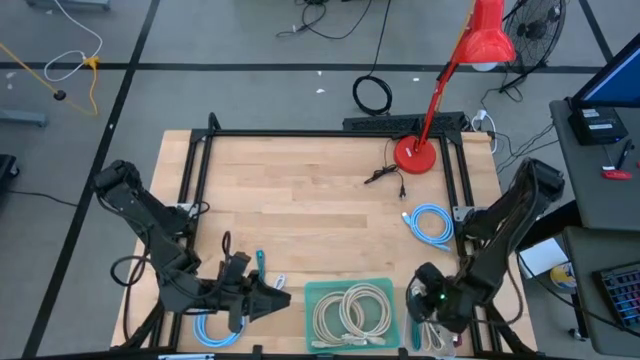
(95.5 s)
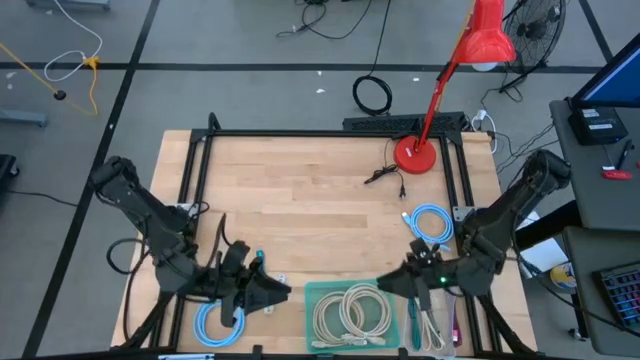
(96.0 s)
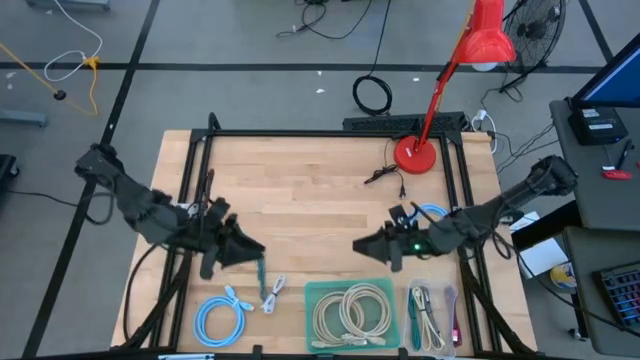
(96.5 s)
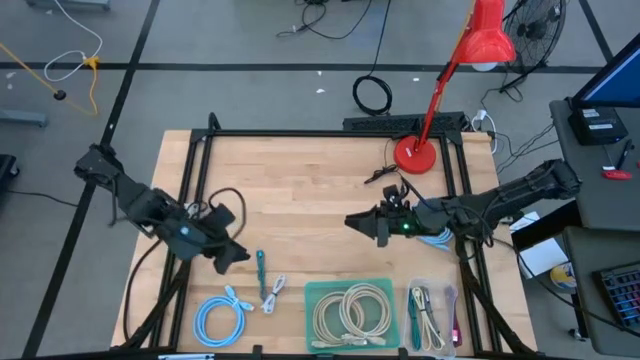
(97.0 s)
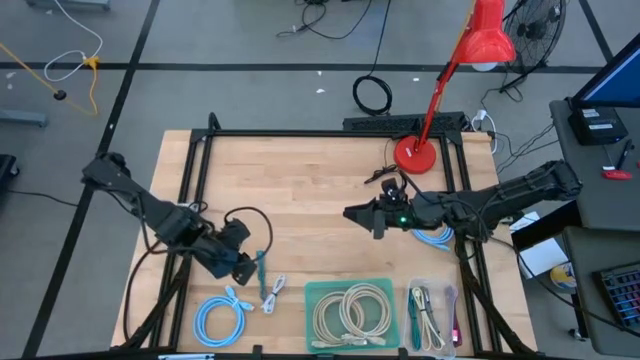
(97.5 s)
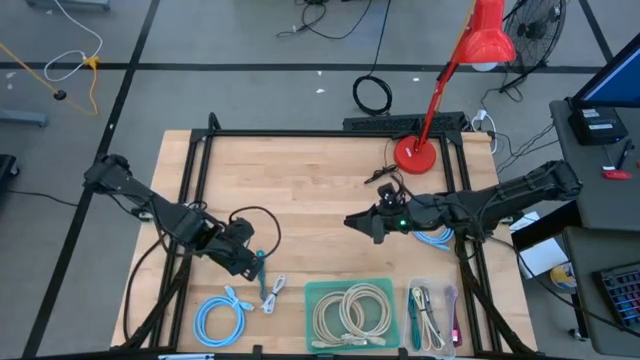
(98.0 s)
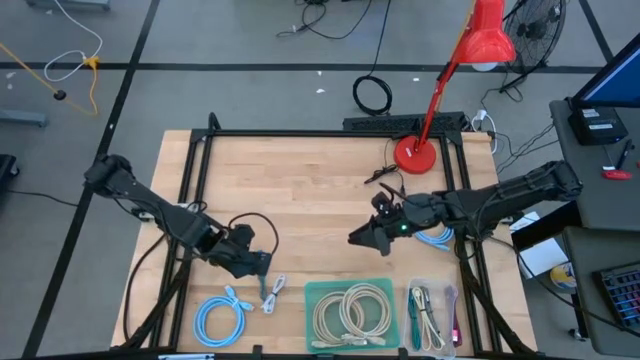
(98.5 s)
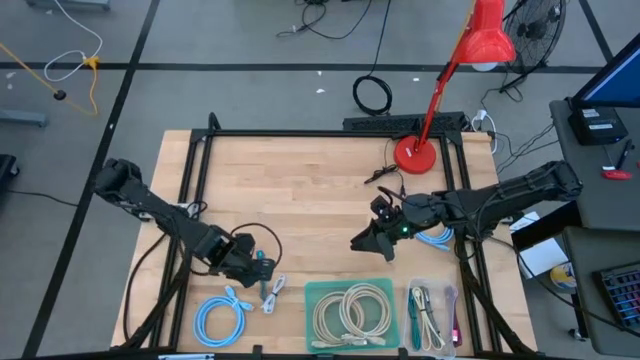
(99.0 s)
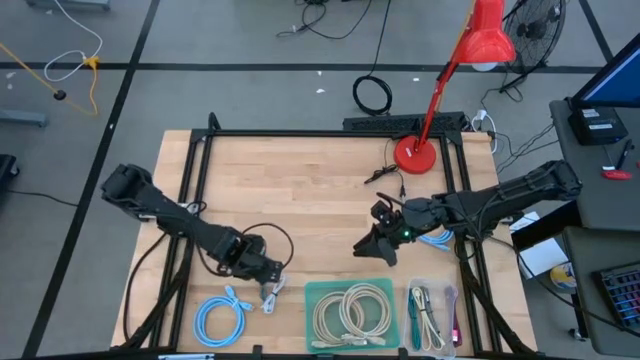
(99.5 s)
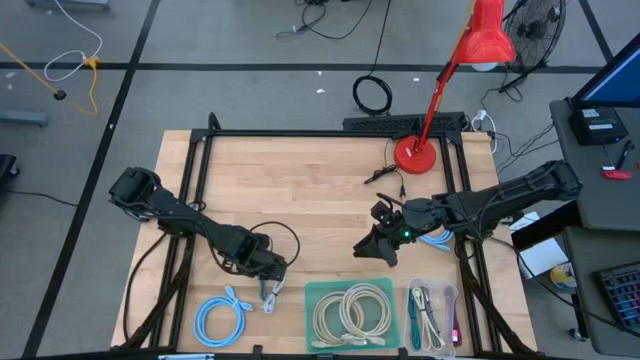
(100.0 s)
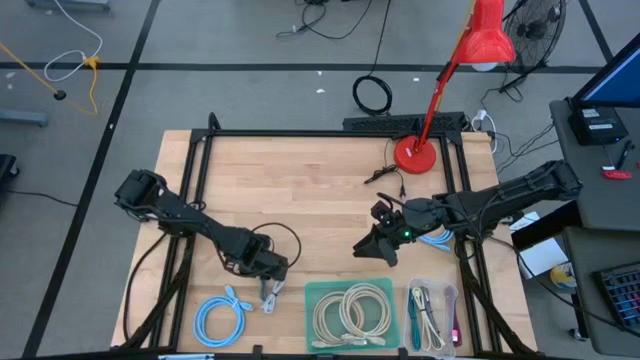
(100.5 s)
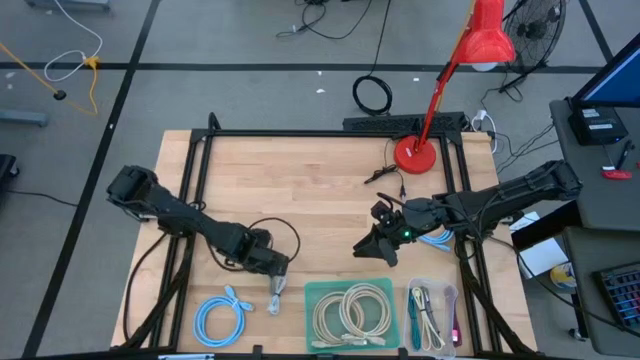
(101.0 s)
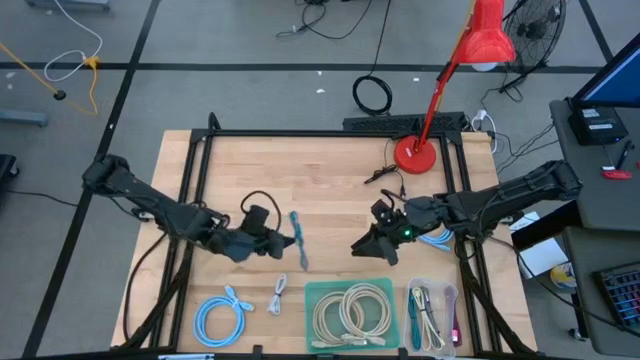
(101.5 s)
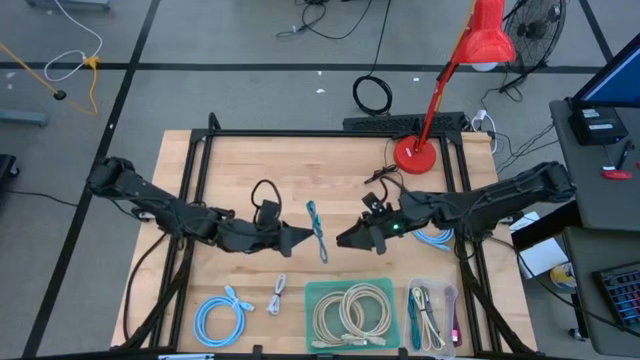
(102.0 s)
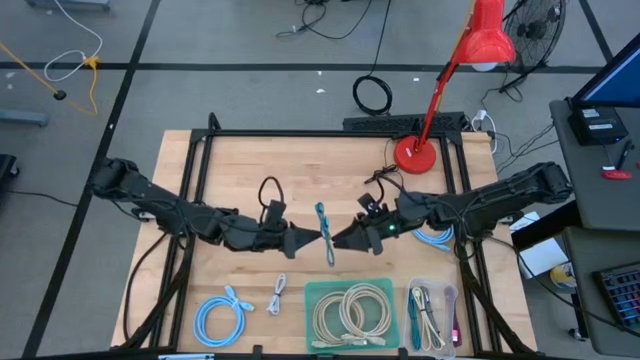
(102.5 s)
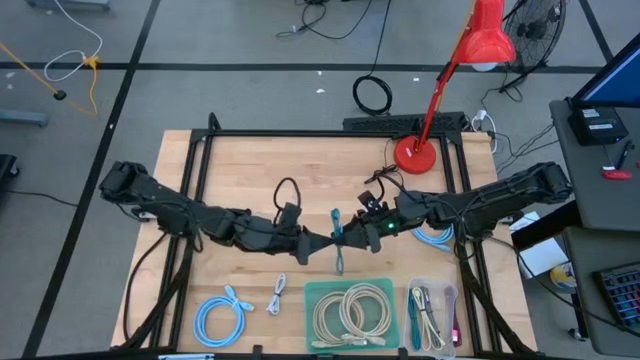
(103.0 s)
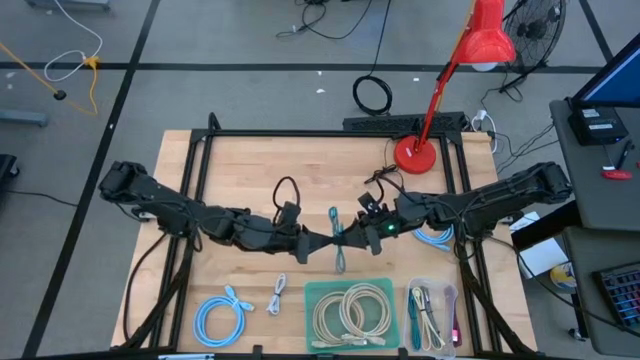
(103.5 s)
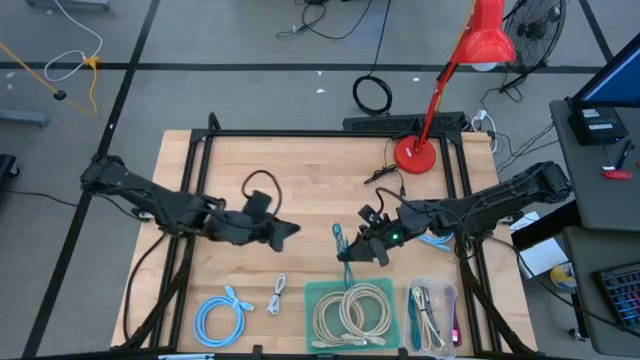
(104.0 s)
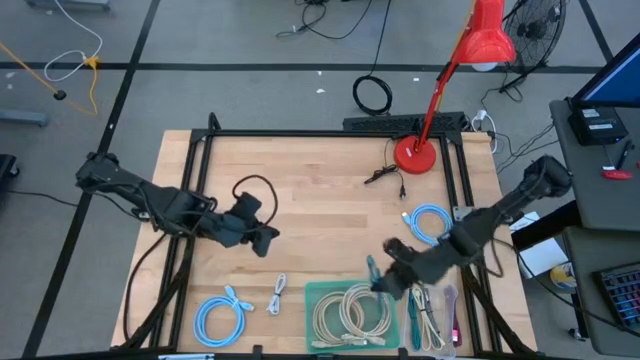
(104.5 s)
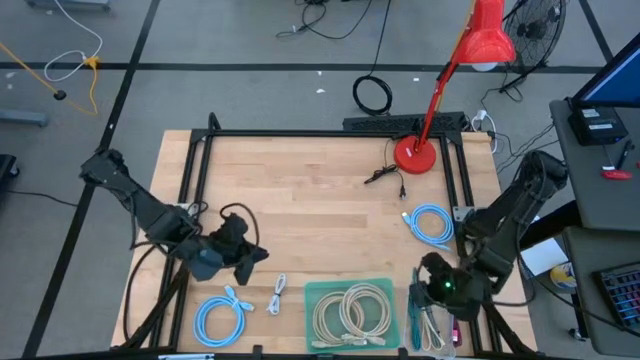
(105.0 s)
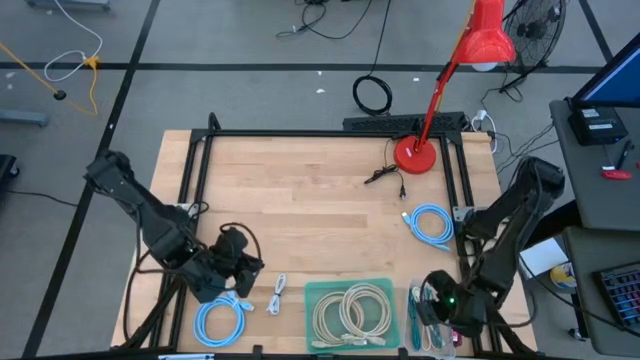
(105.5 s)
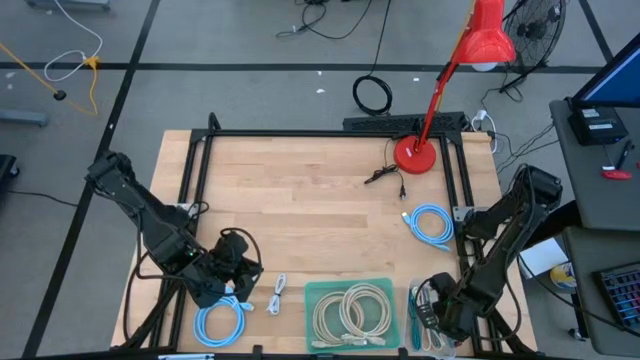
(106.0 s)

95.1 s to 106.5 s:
Task: Pick & Place USB Port
Put the blue charger cable into the white transparent bin

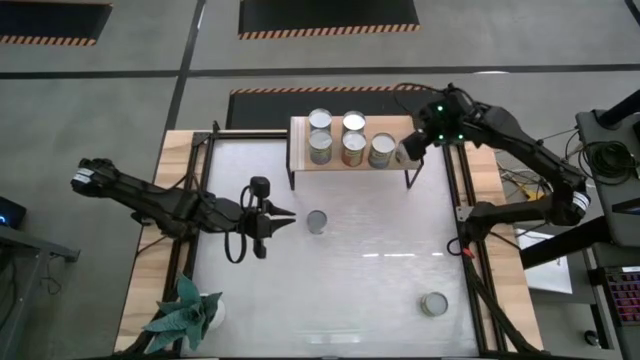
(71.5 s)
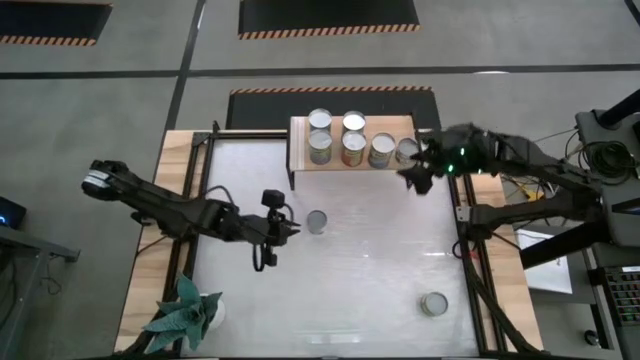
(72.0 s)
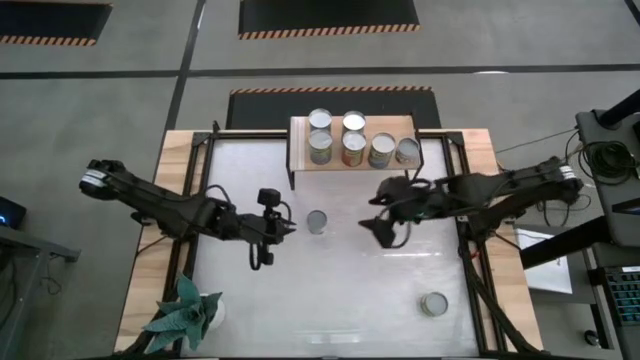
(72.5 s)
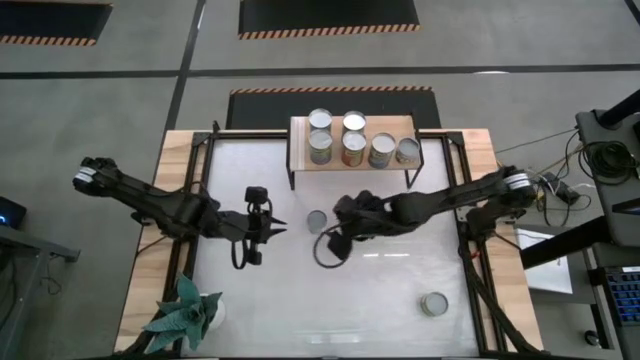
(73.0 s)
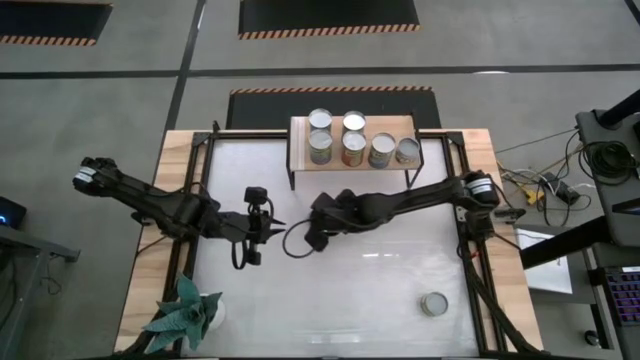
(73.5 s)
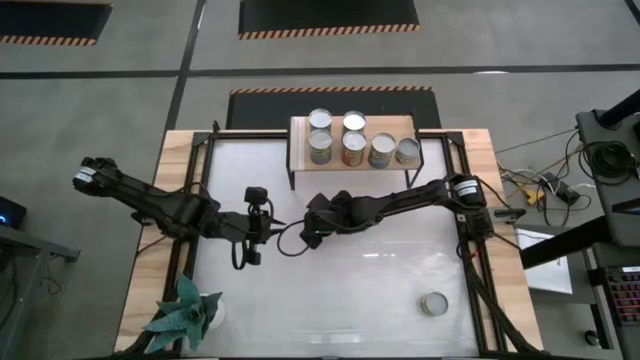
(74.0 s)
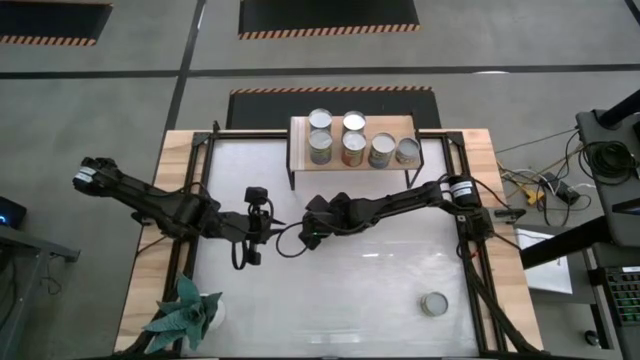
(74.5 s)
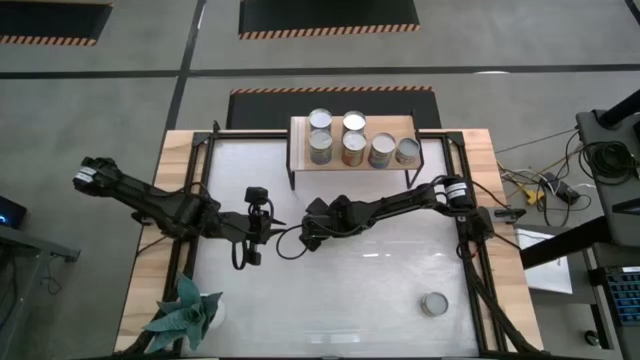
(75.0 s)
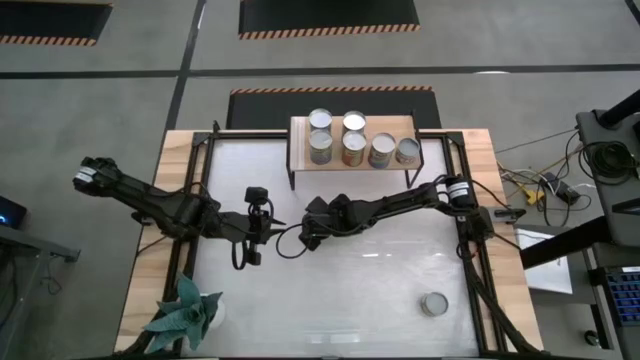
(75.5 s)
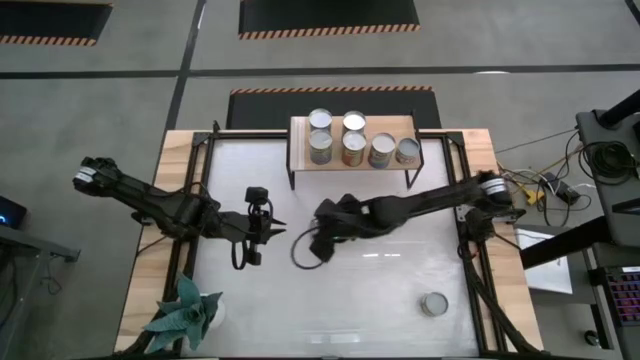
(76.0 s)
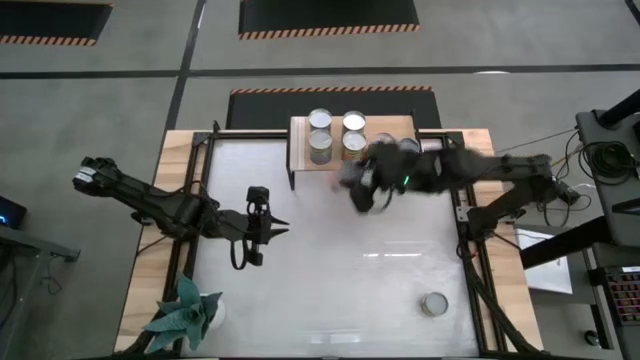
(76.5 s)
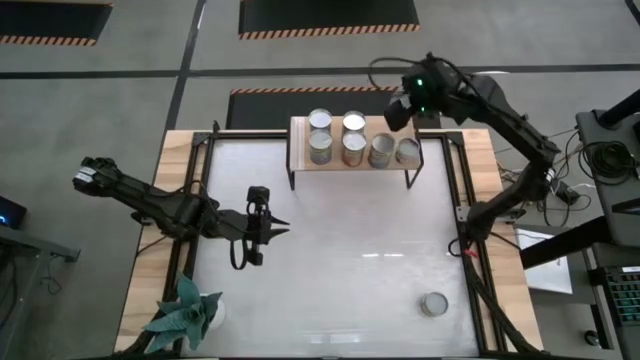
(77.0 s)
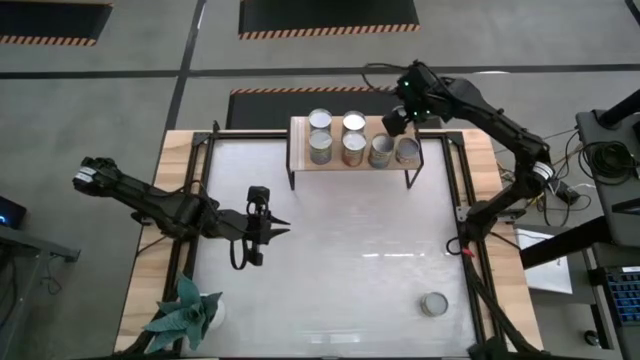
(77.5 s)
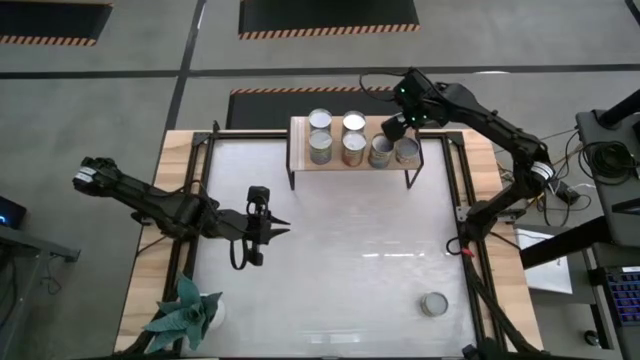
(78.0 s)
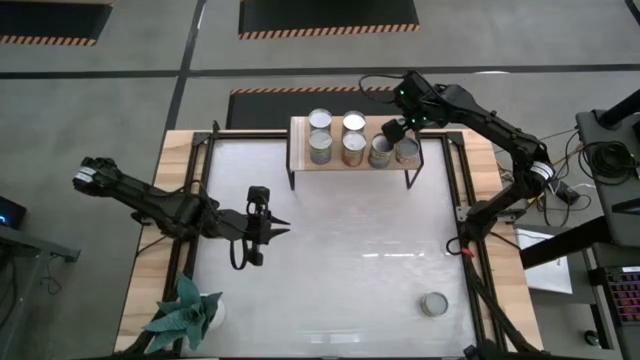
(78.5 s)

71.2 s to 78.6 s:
Task: Pick and place cans onto a shelf
Put the canned saucy meatballs on the shelf

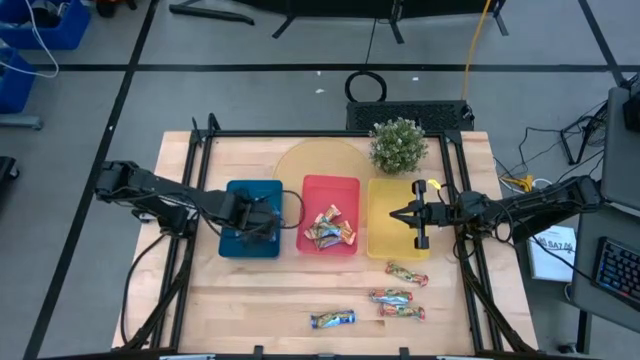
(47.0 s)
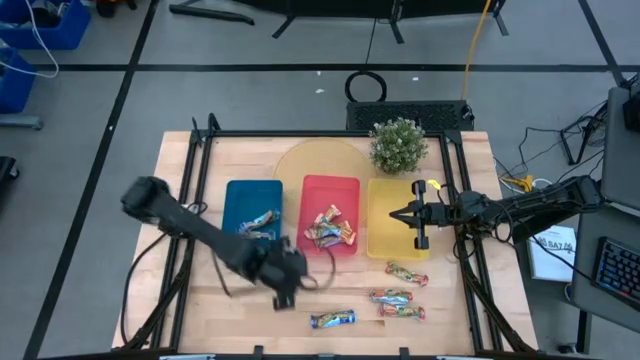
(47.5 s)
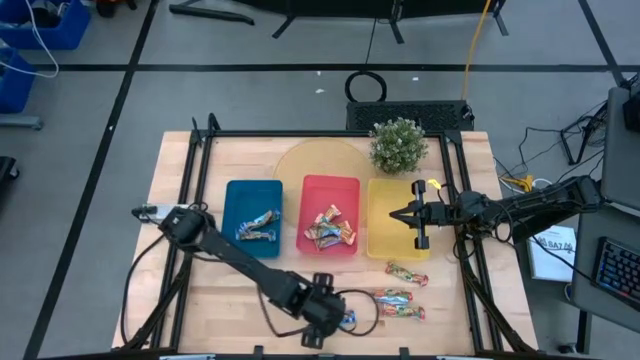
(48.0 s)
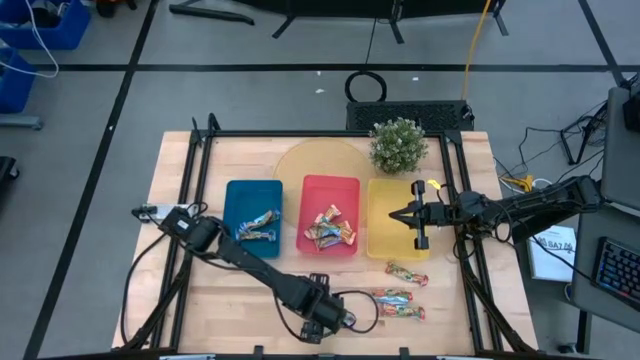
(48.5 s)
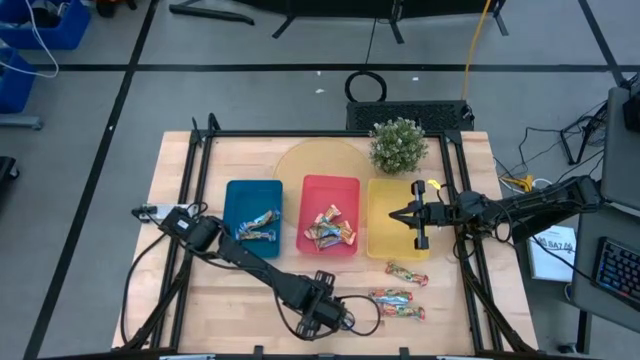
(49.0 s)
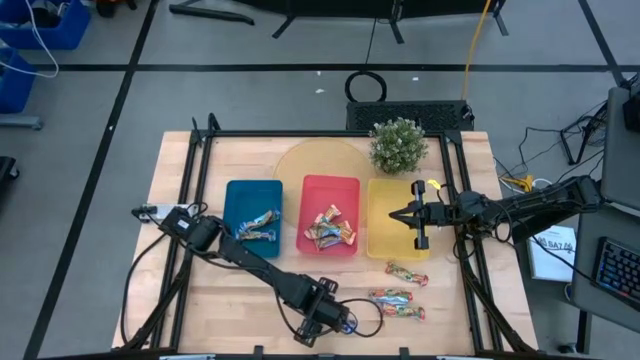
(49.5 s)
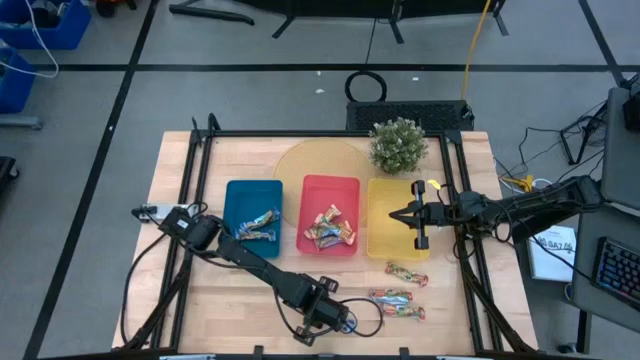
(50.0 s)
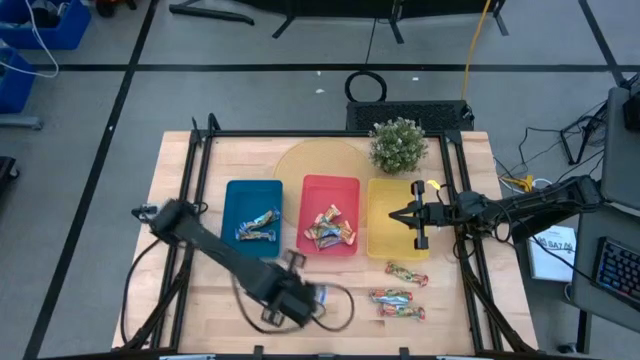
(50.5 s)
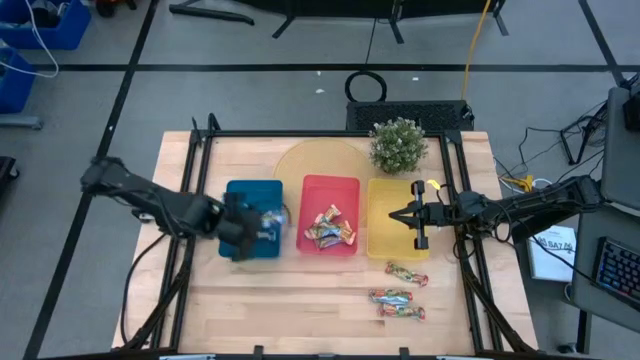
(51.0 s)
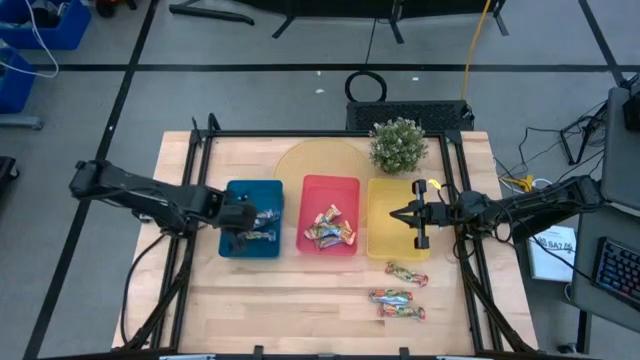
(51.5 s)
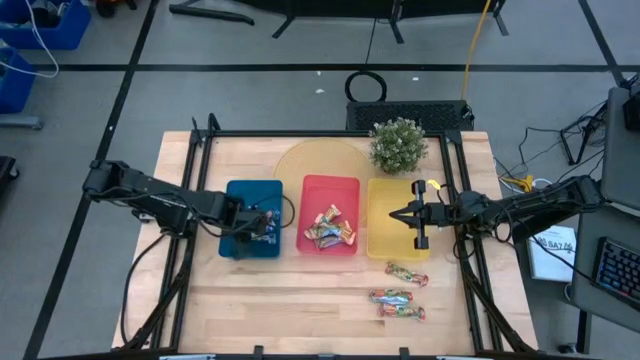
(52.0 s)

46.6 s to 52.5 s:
Task: Pick and place Granola Bars by type
Put the blue granola bar into the blue bin
